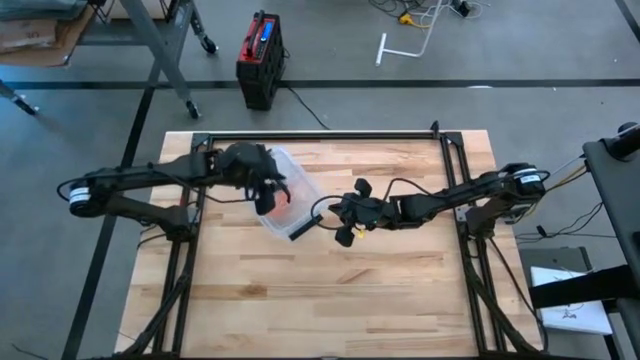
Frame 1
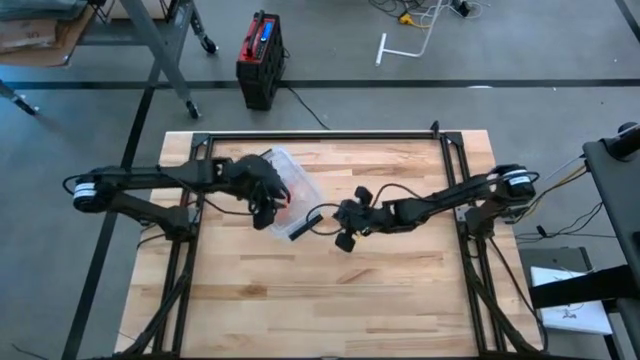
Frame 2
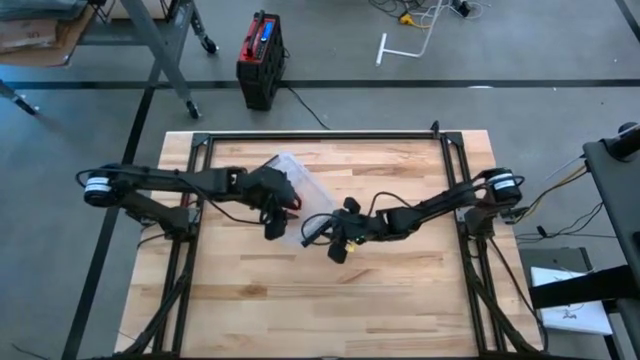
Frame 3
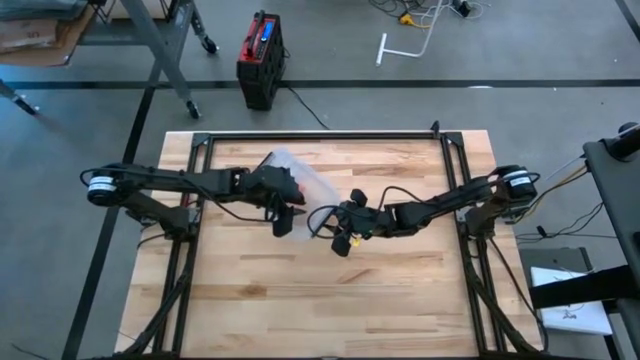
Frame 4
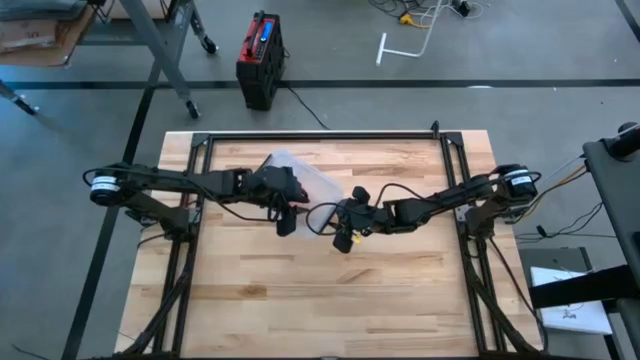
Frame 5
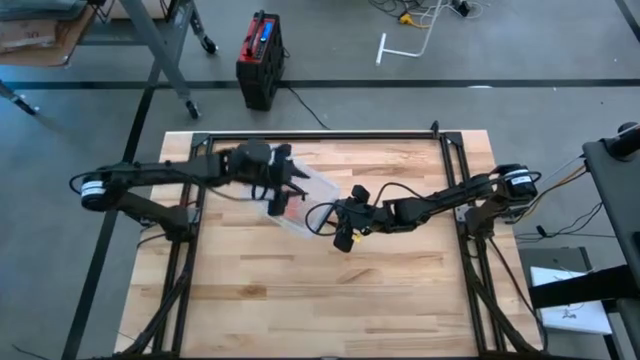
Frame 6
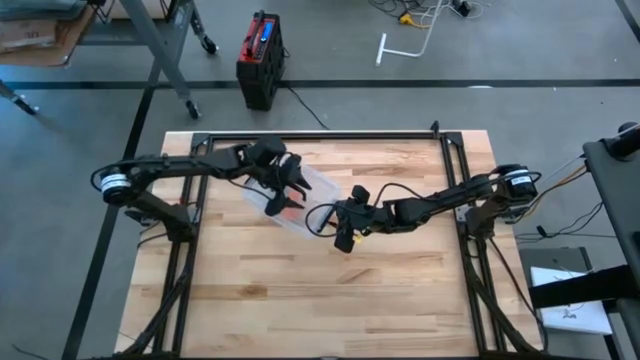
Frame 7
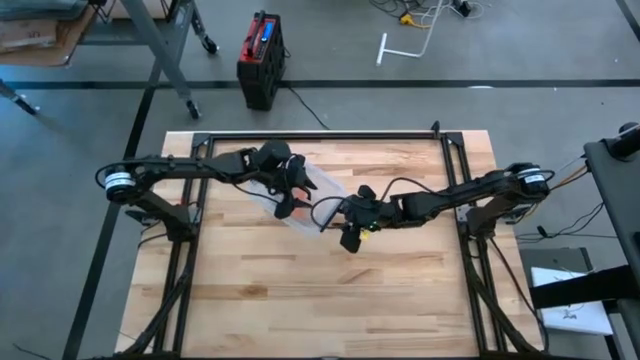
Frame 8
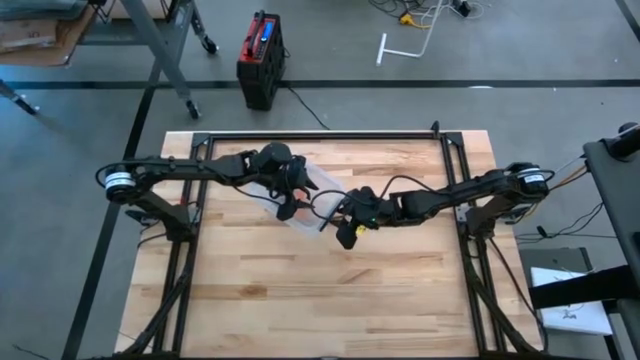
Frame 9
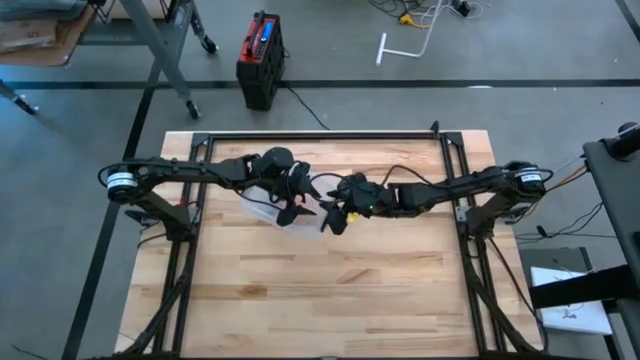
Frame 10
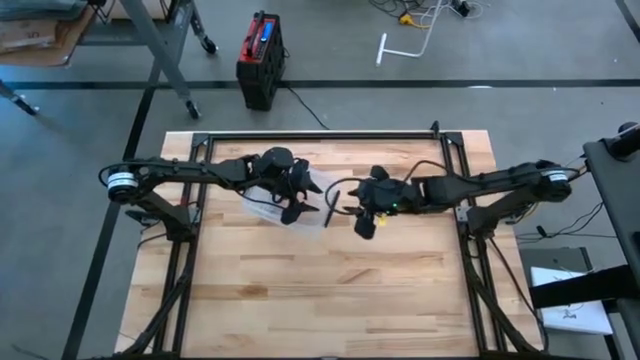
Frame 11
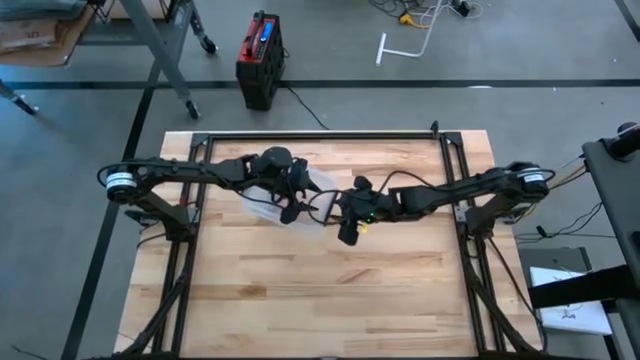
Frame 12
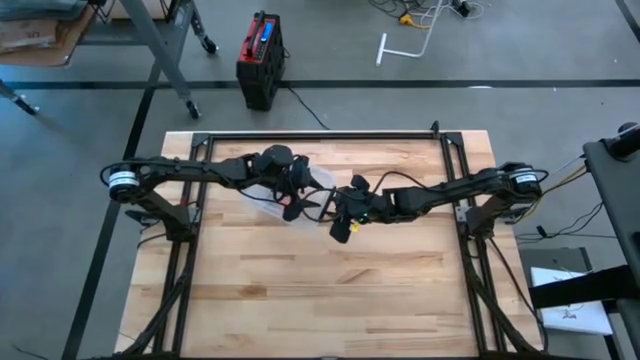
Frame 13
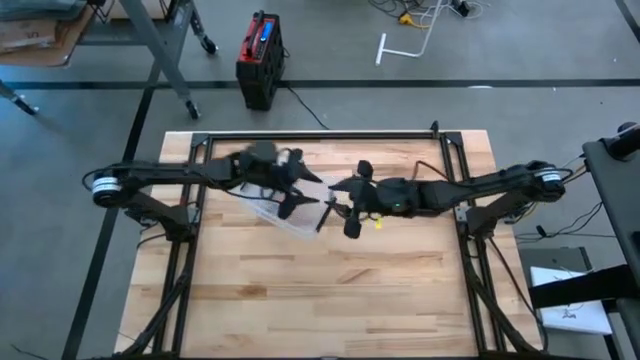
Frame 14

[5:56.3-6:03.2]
Task: Roll bandage
Close the transparent bin

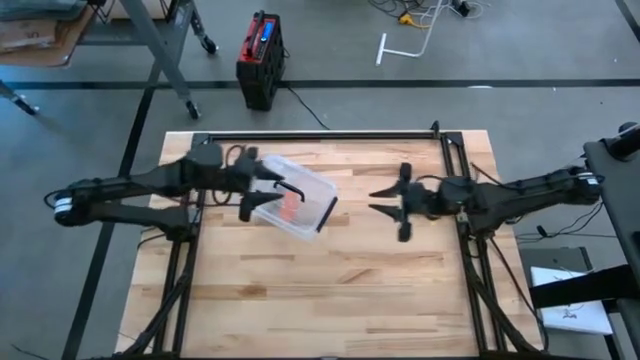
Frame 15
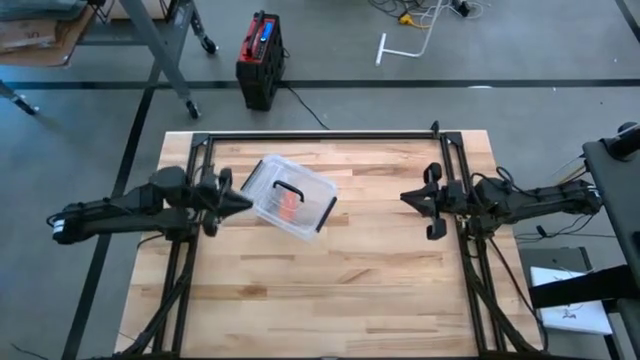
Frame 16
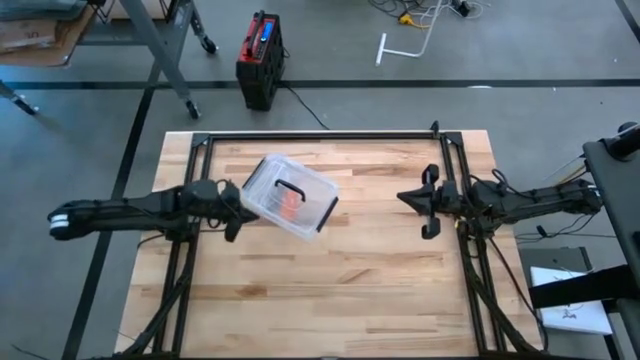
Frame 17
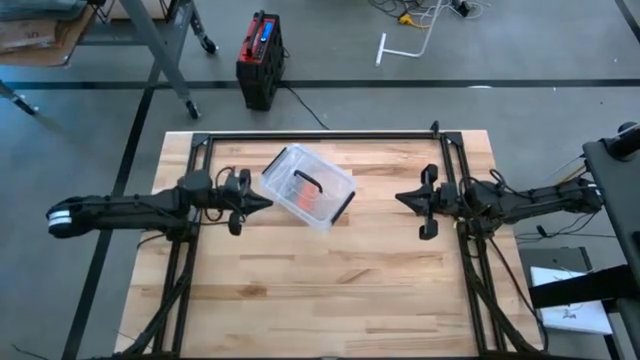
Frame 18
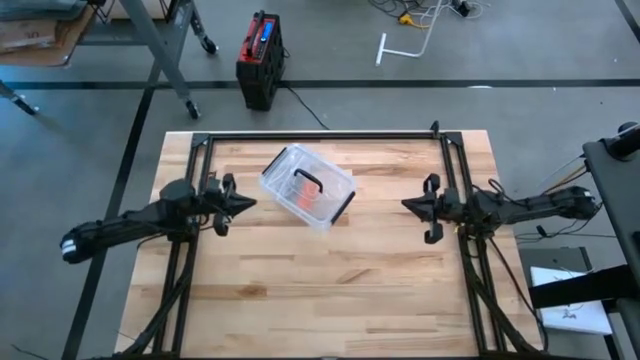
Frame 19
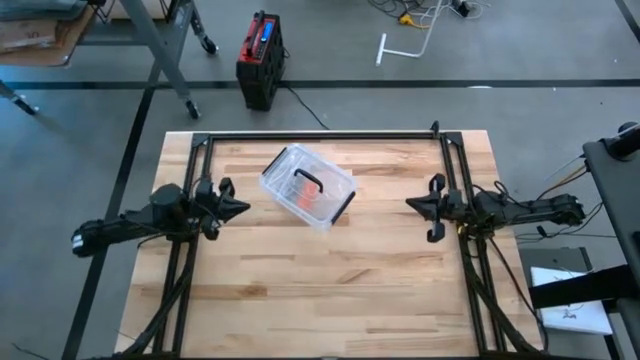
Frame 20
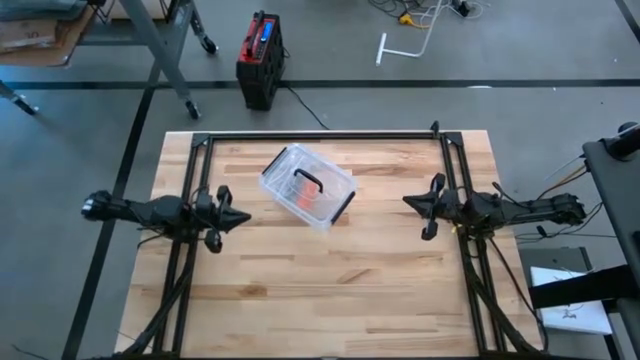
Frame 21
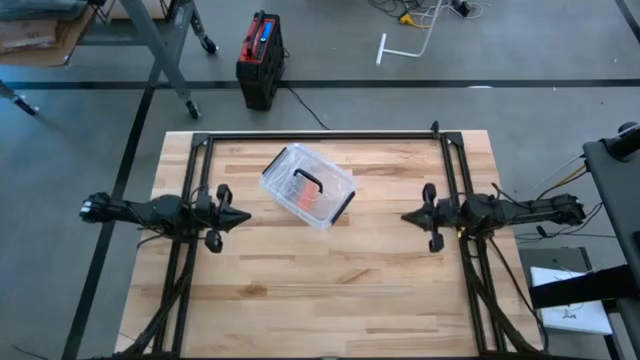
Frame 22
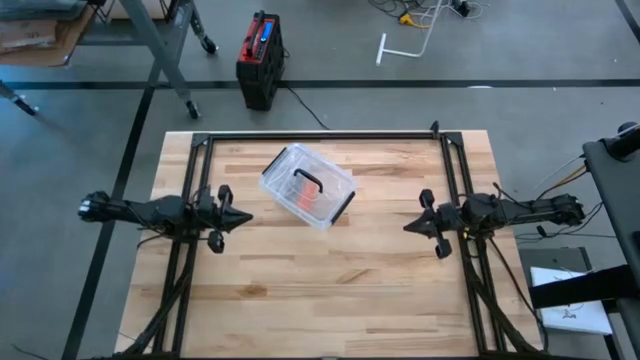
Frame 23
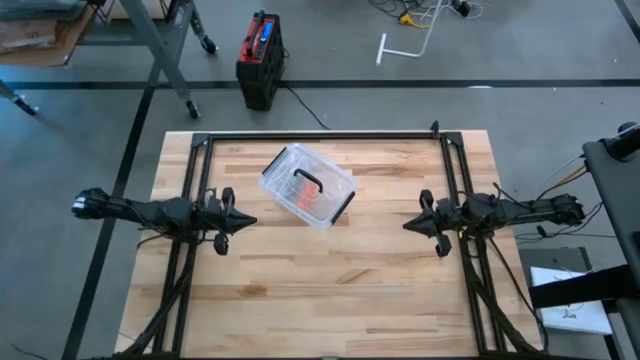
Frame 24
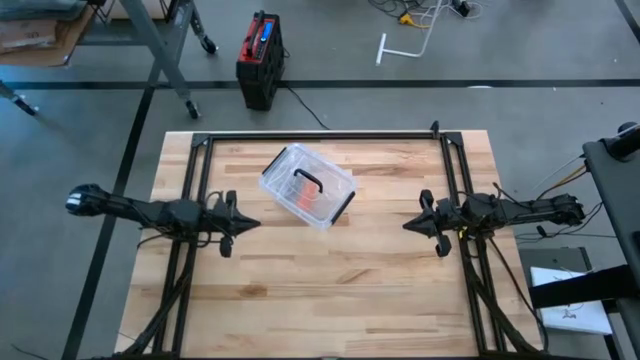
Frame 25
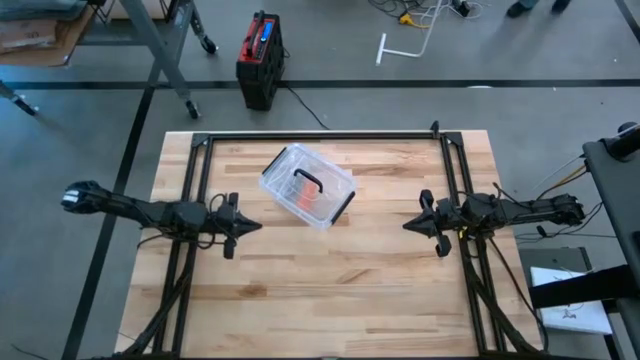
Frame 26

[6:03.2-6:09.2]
Return to Home Position

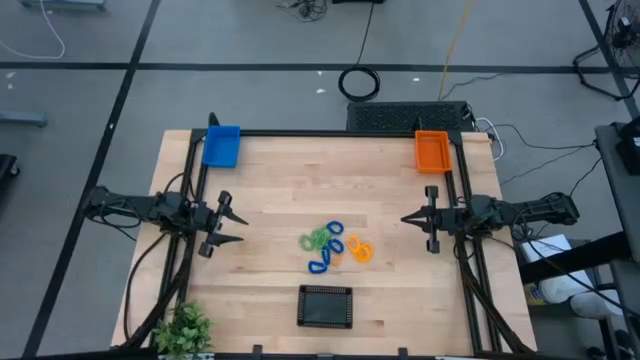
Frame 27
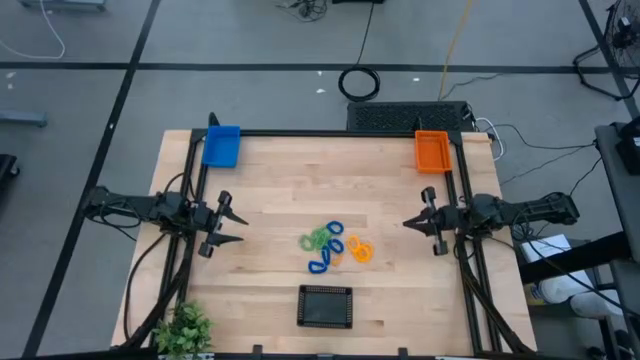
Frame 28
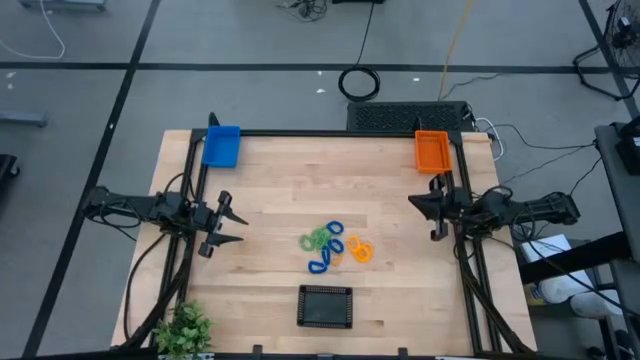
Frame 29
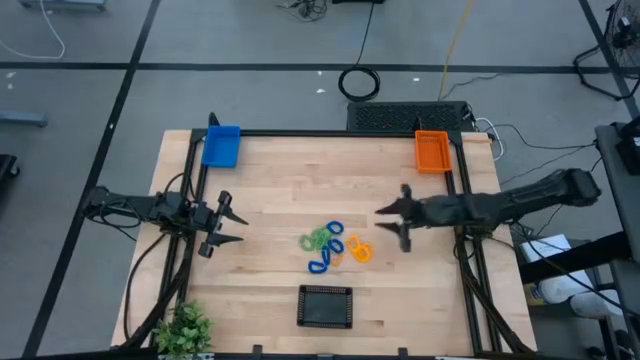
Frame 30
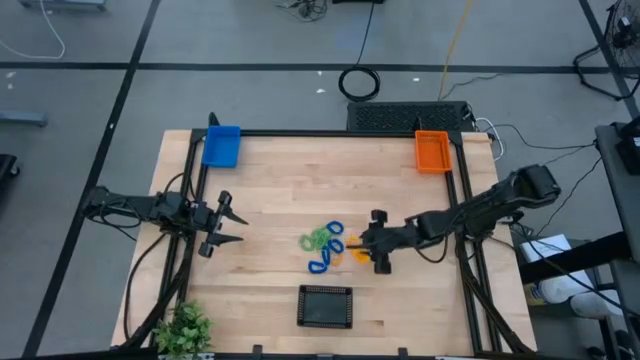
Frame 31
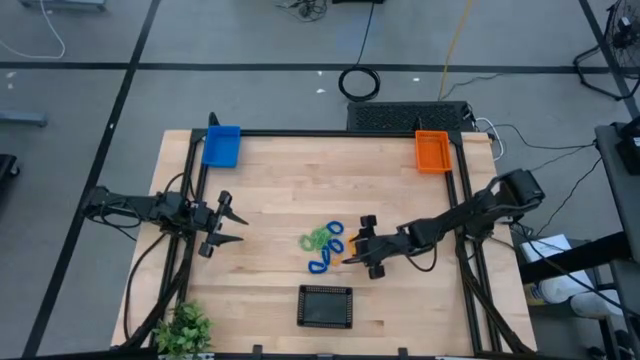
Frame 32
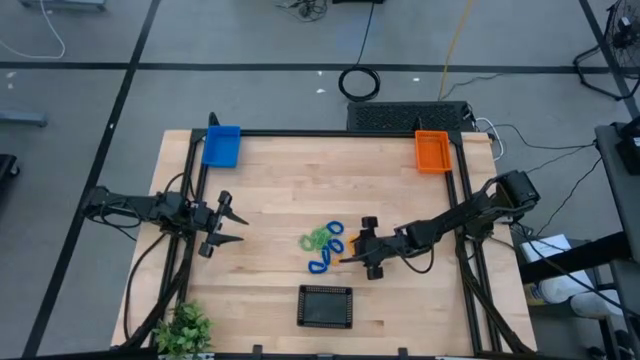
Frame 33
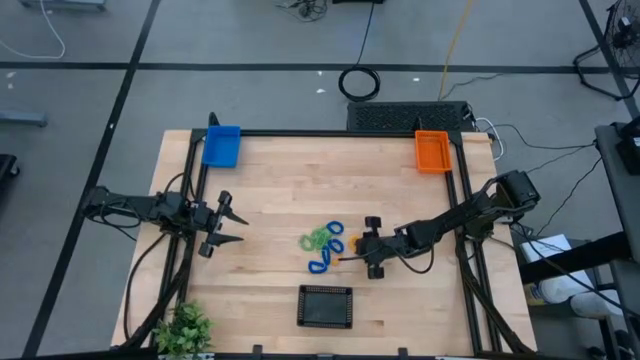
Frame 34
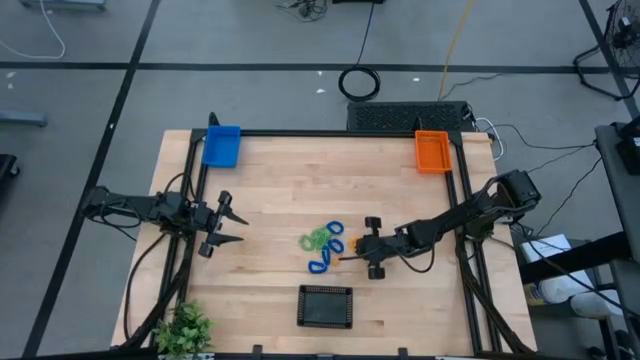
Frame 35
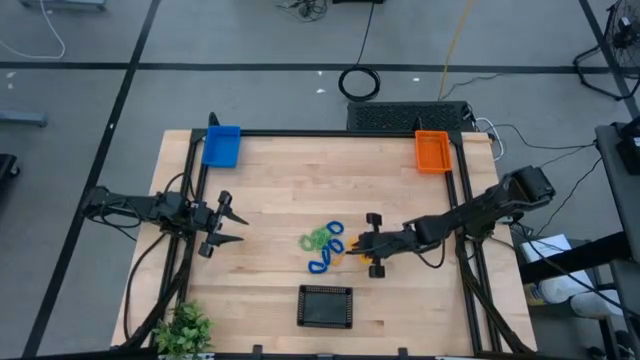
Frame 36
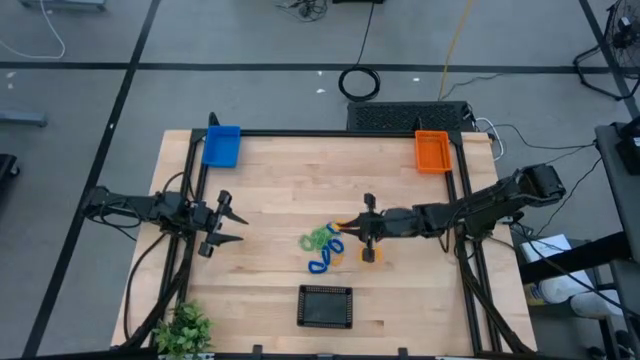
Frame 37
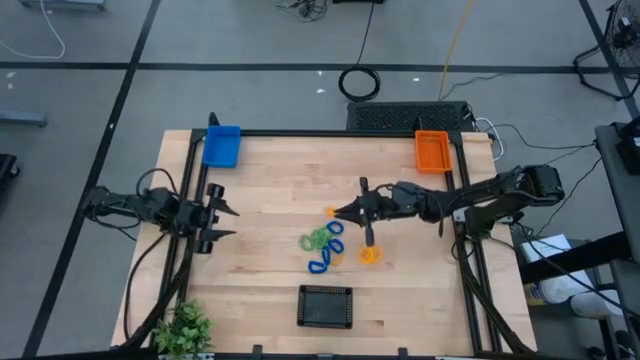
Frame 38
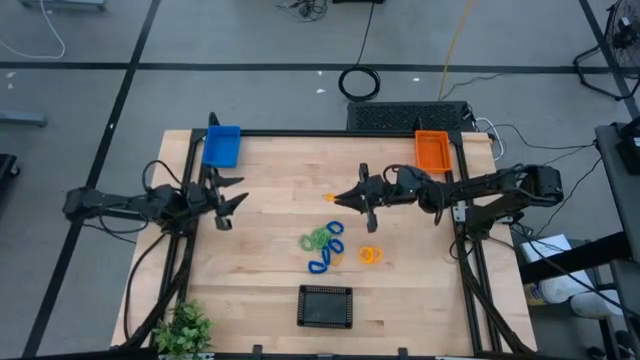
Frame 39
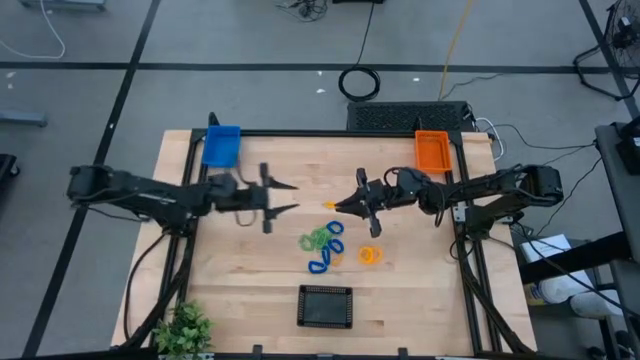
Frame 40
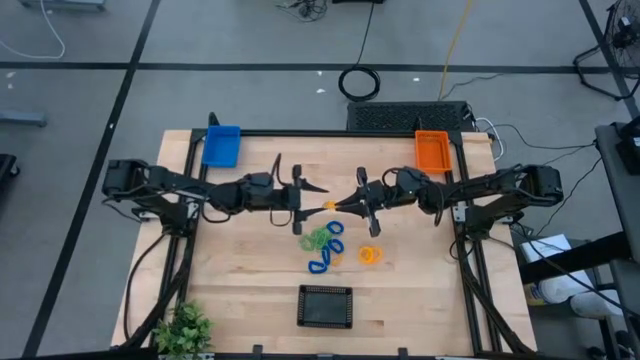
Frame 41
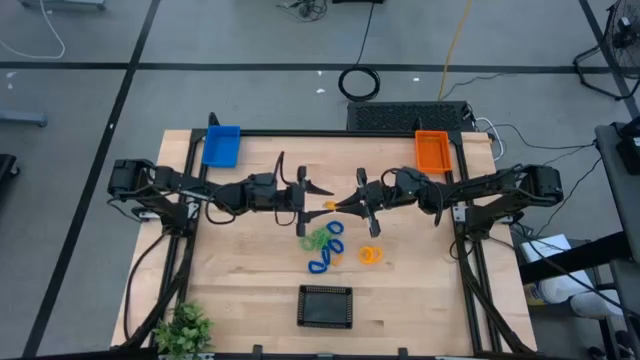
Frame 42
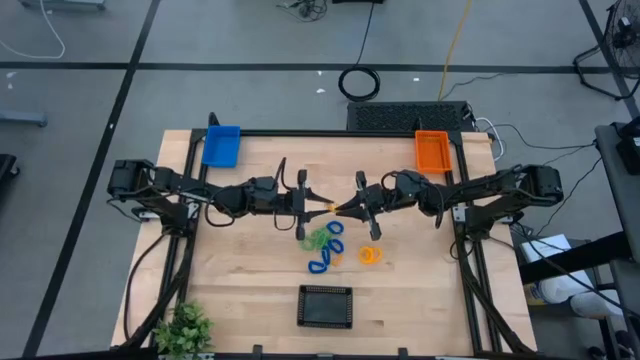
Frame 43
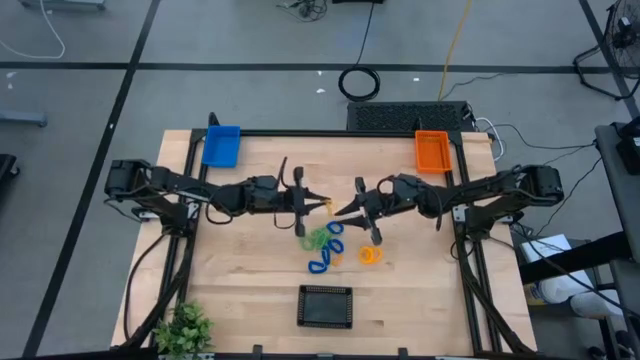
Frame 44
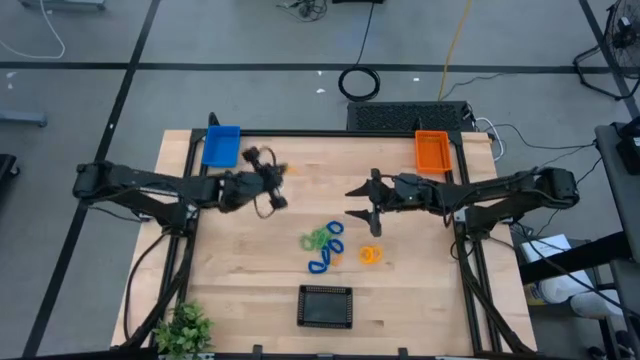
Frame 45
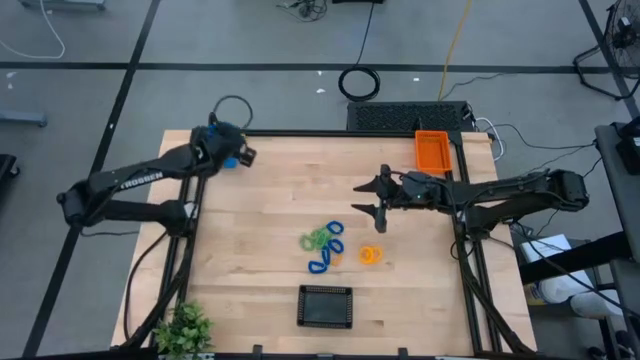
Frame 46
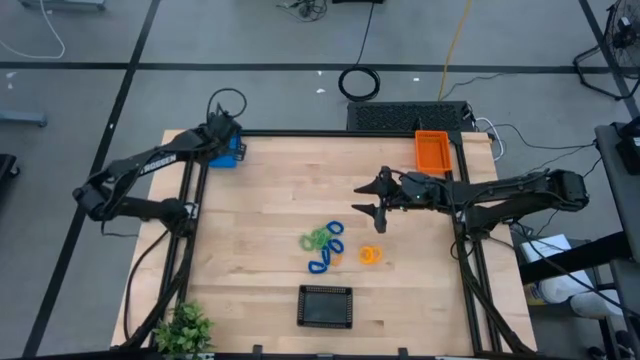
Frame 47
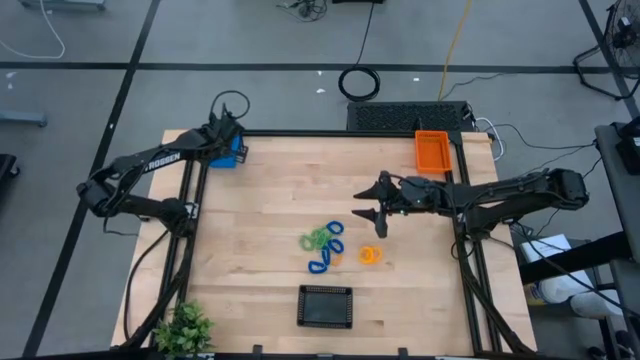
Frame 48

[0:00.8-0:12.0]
Task: Sort spring keychains into baskets
Put the orange spring keychain into the blue basket
